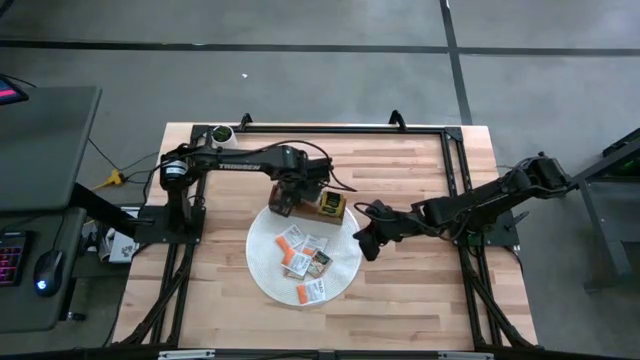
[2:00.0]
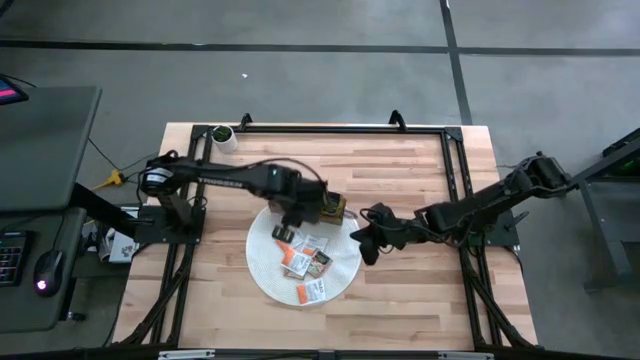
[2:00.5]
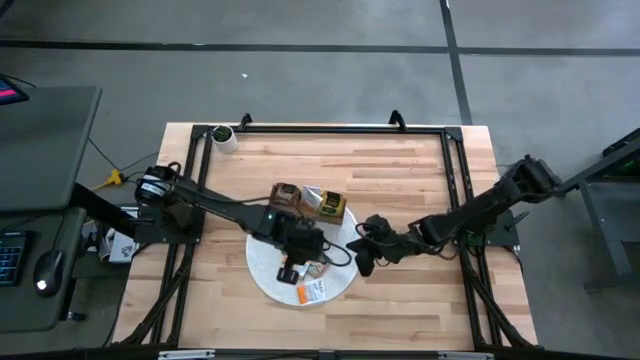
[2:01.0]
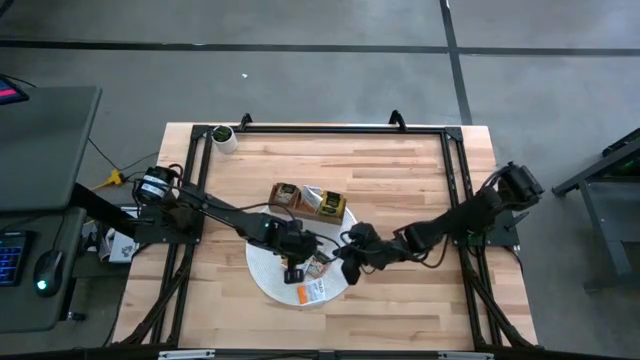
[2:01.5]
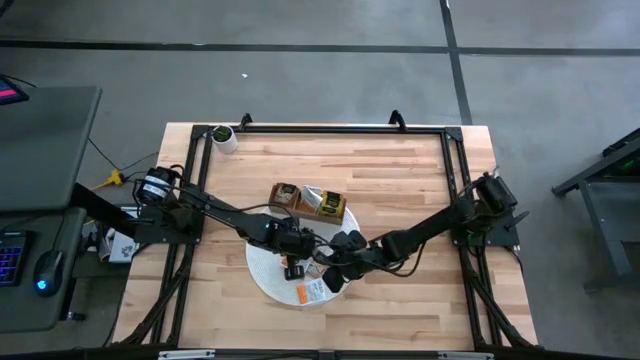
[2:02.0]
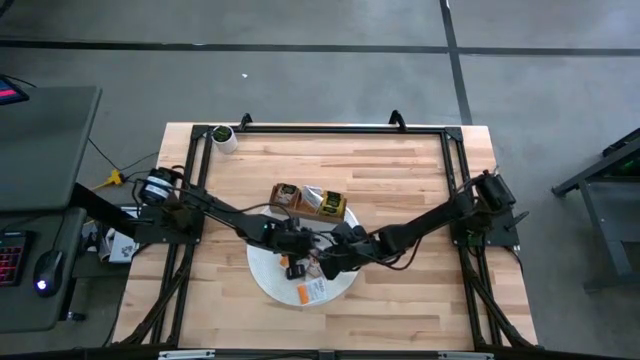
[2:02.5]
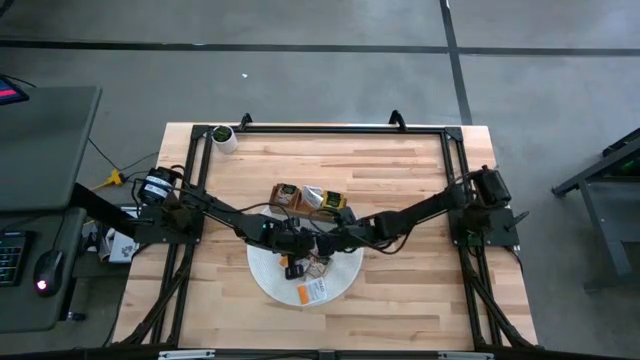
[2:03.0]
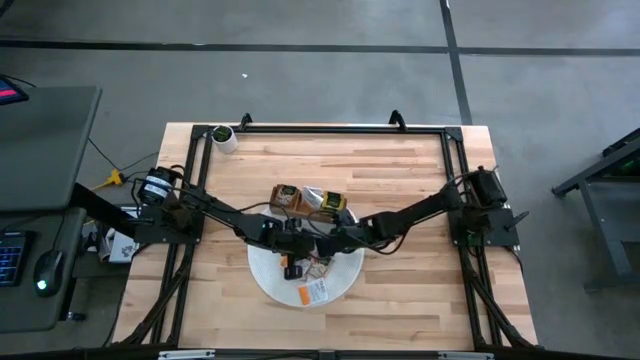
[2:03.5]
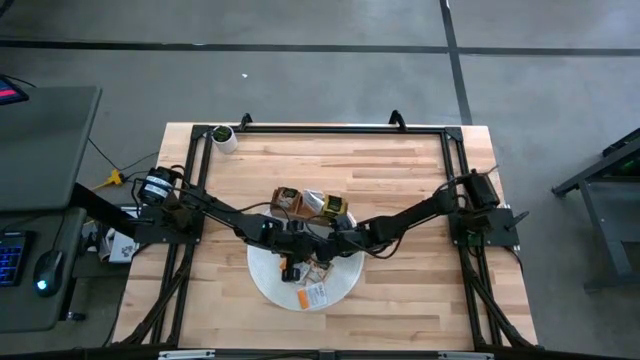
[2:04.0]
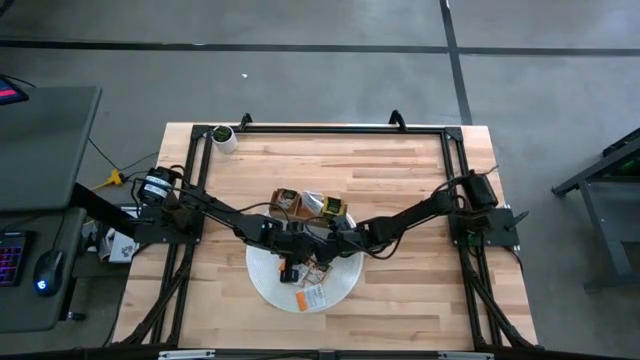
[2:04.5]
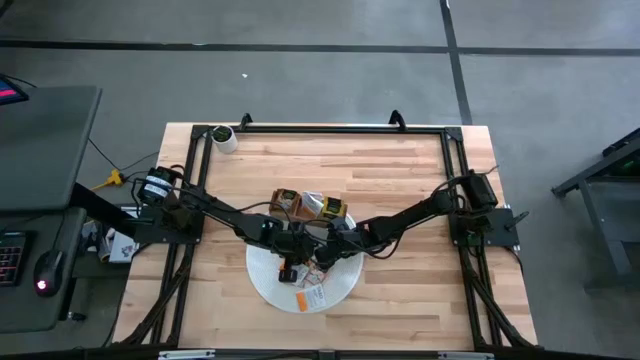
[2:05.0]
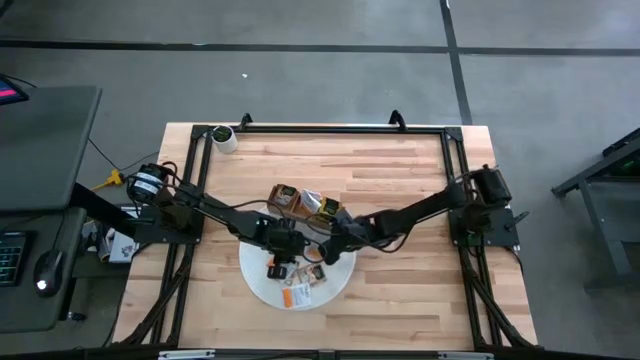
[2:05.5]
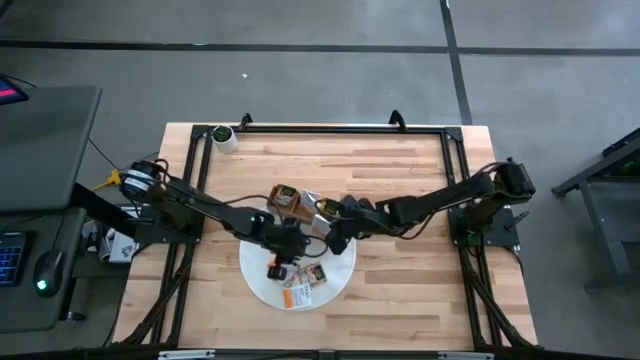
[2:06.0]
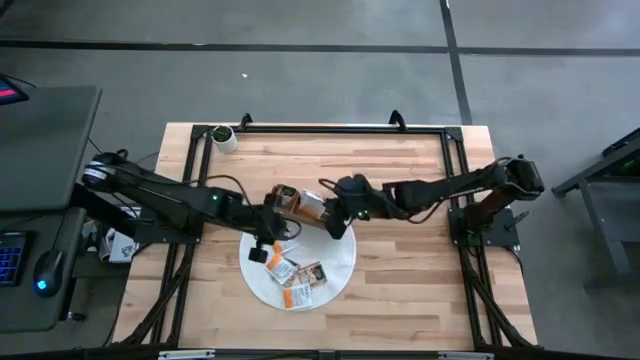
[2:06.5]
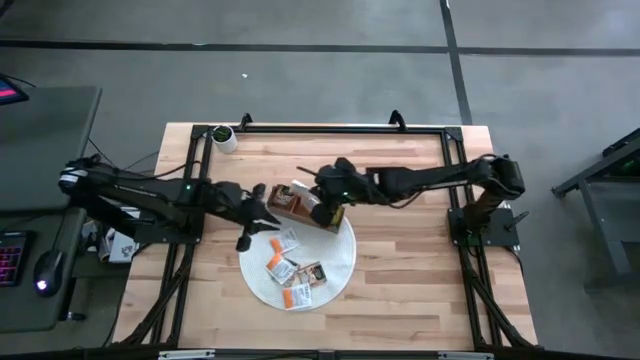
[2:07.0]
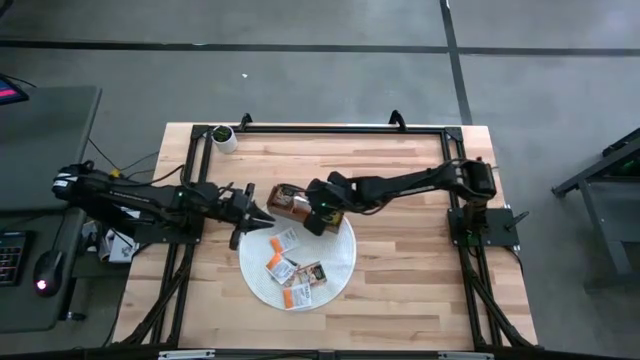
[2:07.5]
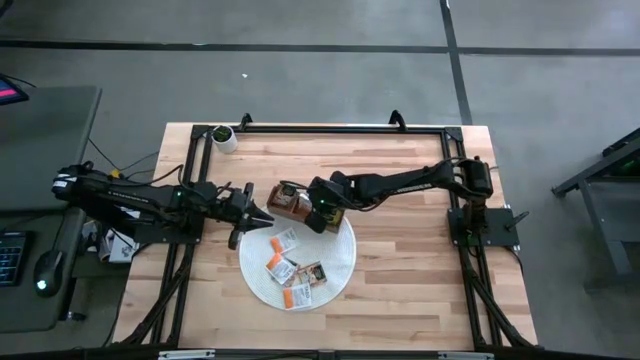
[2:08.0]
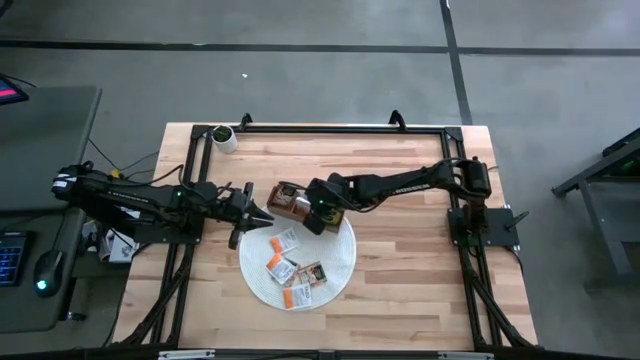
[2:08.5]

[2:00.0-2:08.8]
Task: Pick & Place Tea
Put the orange tea bag into the middle section of the wooden organizer

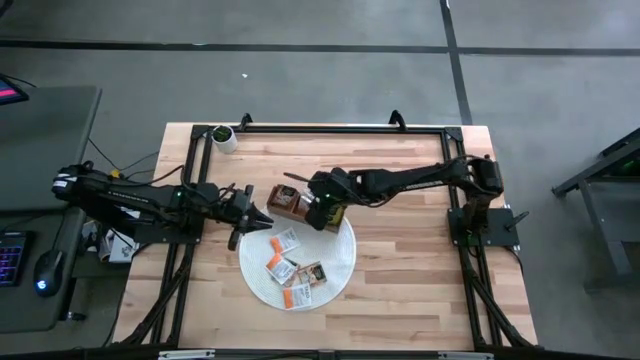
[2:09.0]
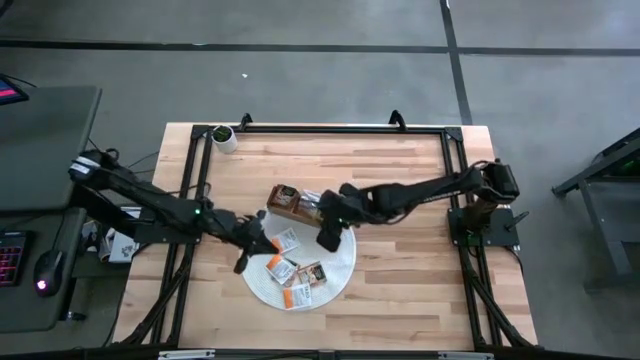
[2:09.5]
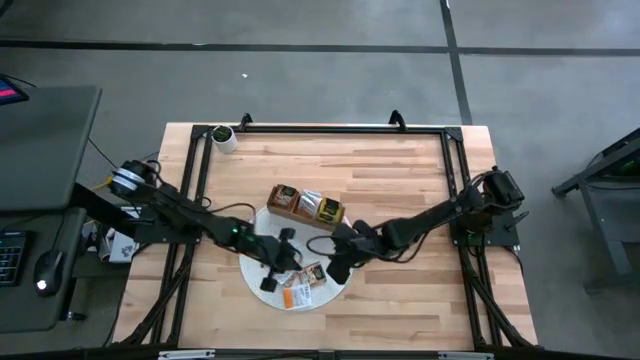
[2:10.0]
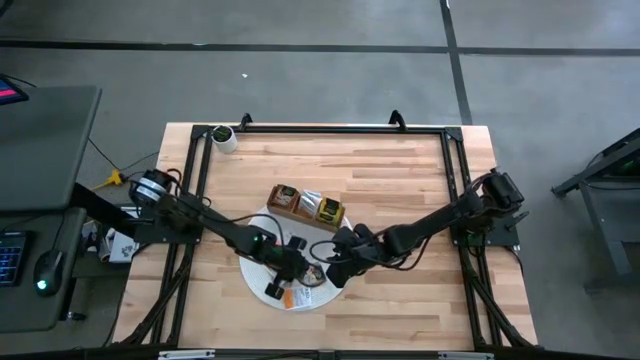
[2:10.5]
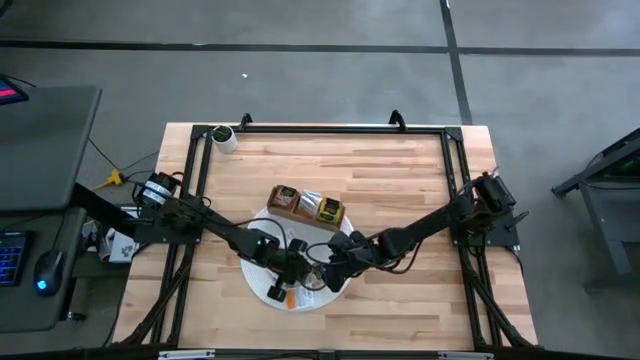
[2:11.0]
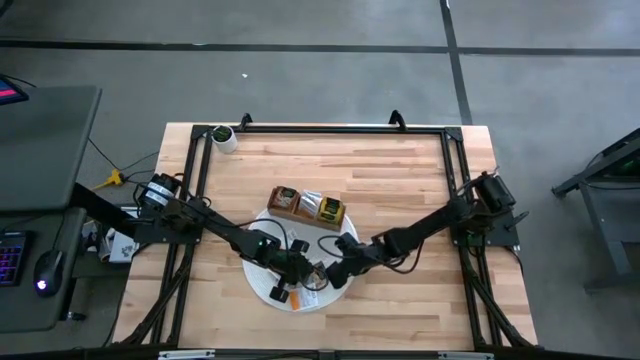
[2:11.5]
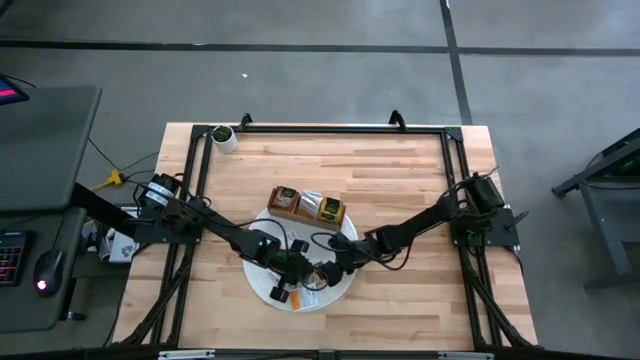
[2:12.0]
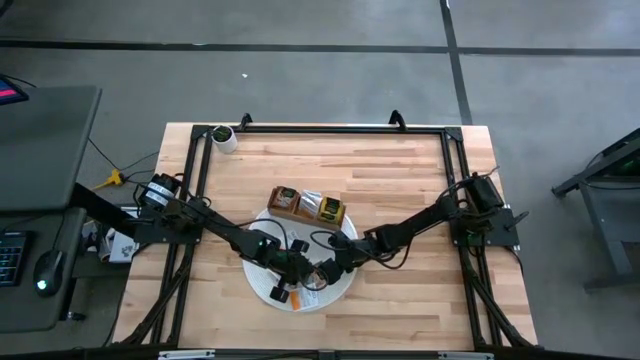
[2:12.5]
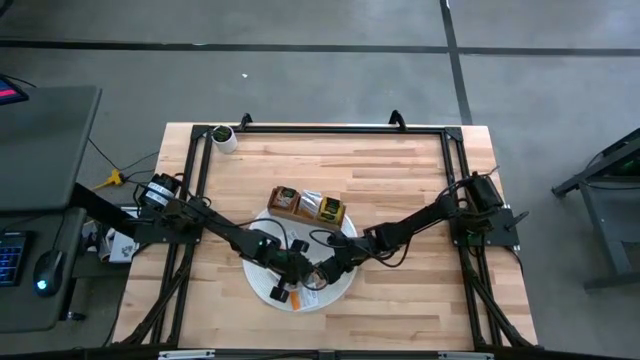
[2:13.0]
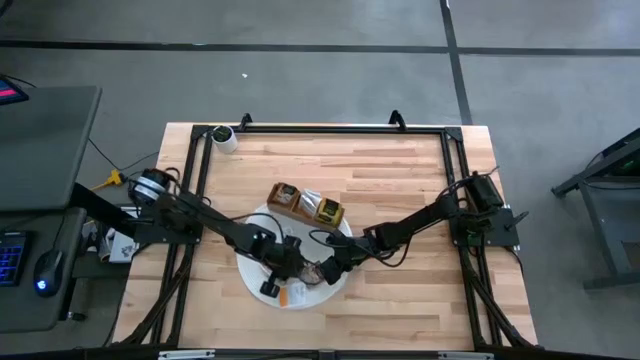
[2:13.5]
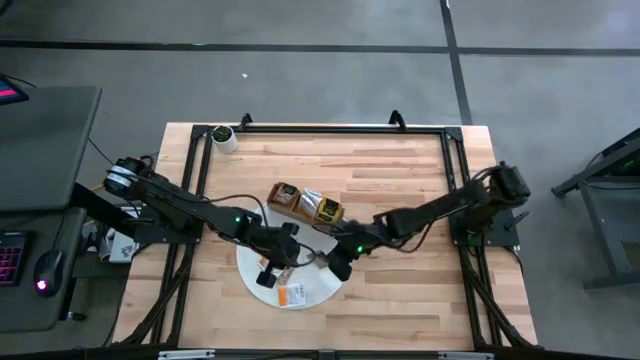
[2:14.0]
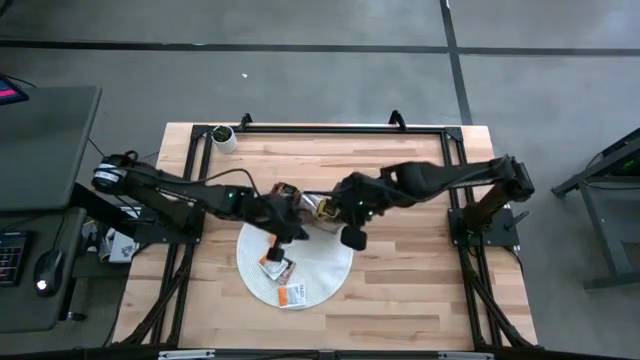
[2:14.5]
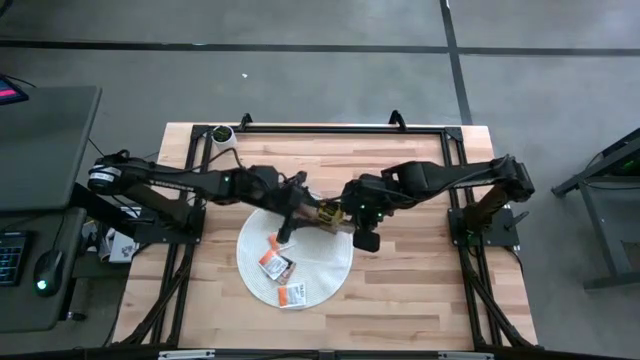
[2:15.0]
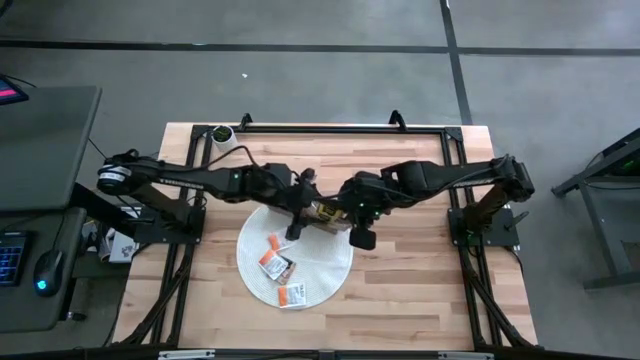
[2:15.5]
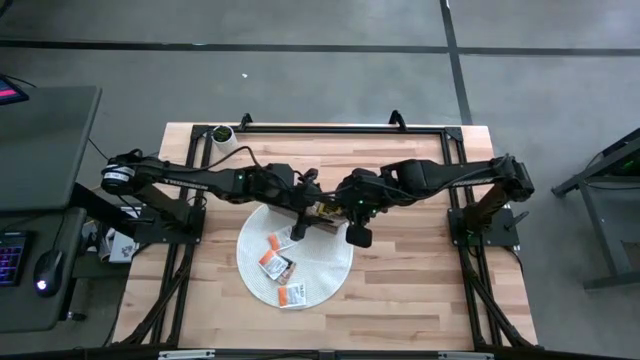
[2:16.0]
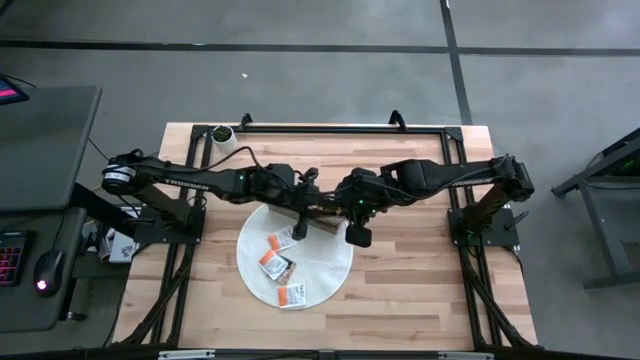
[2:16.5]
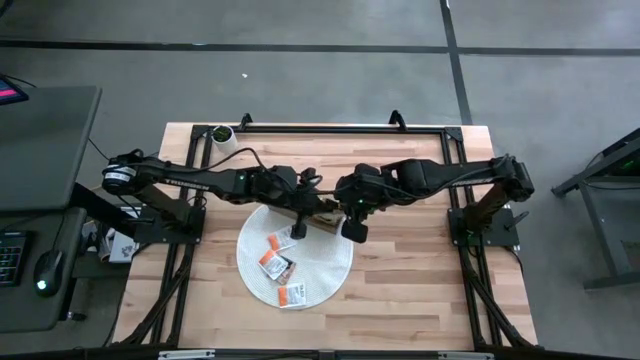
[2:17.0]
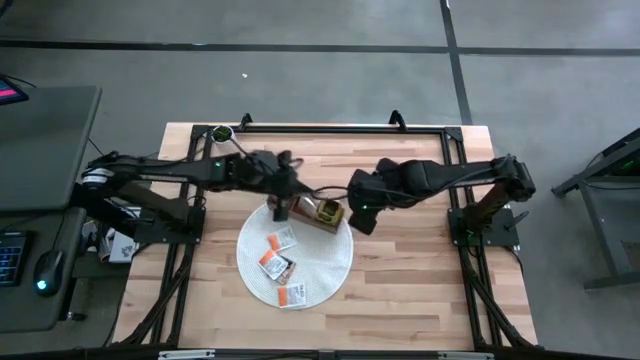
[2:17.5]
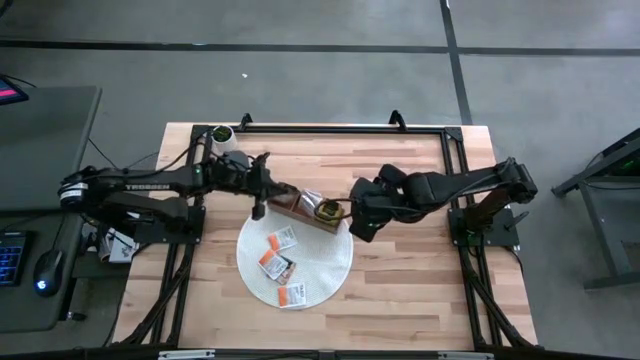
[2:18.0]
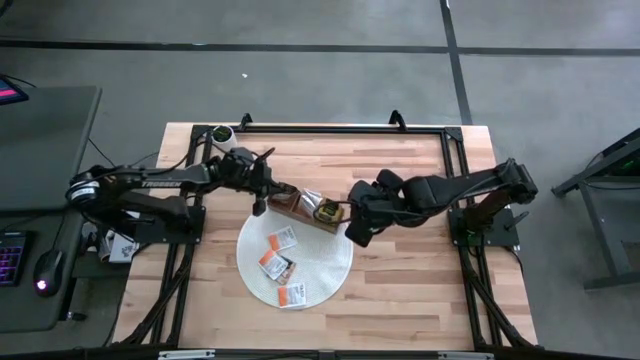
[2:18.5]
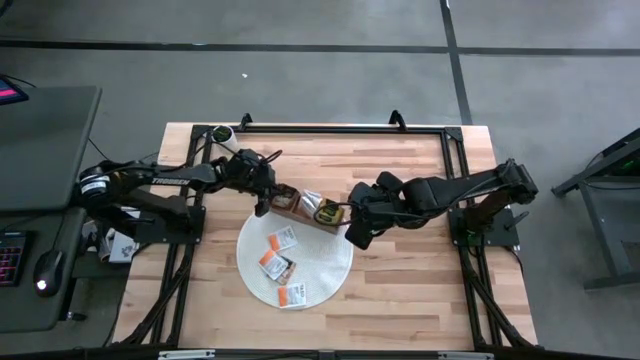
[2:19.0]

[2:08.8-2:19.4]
Put the brown tea bag into the left section of the wooden organizer
